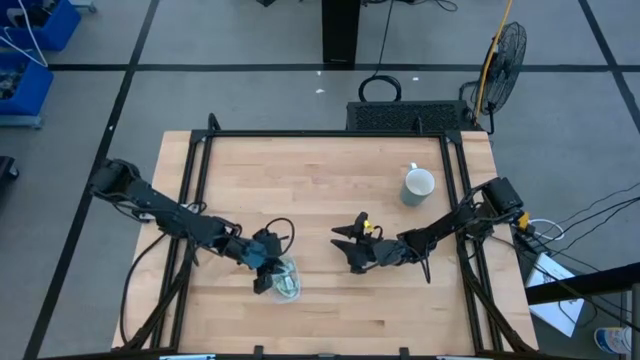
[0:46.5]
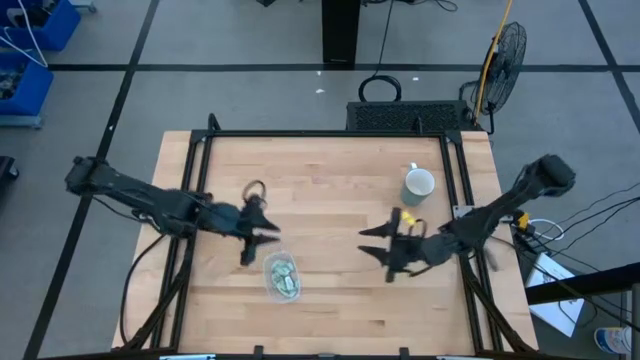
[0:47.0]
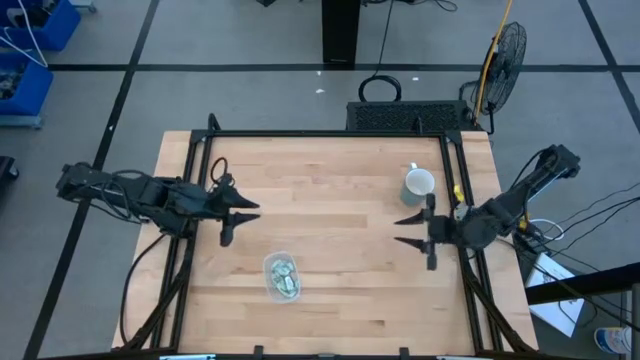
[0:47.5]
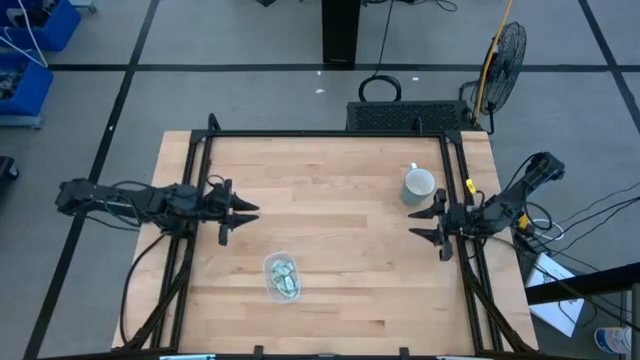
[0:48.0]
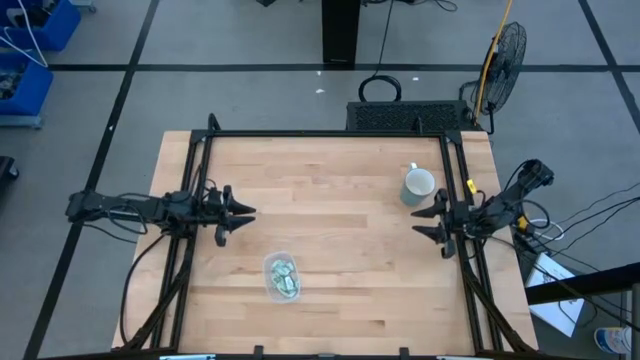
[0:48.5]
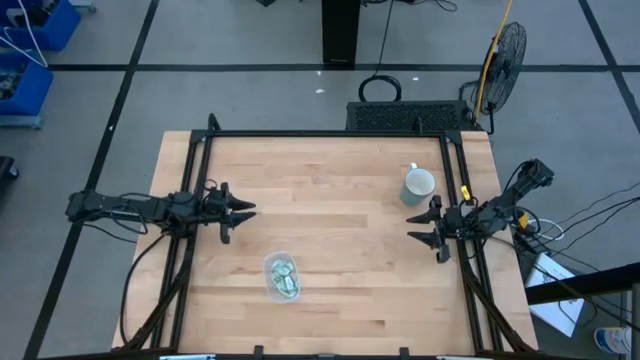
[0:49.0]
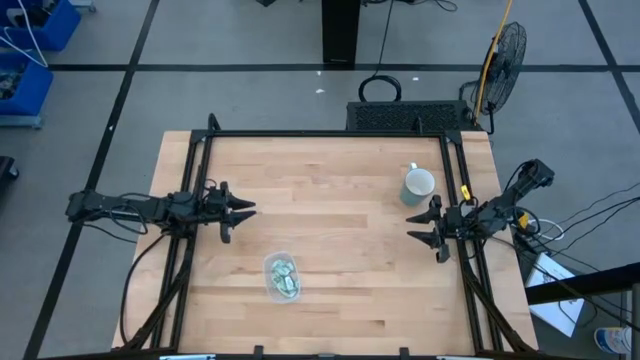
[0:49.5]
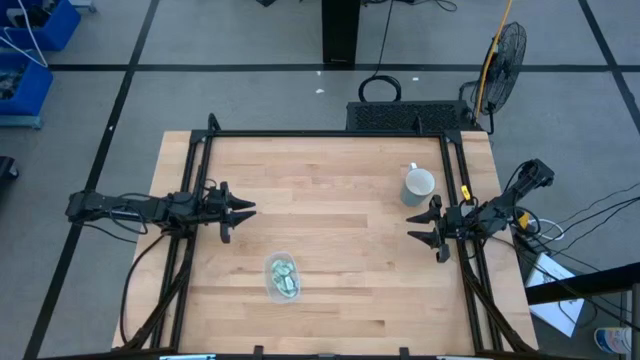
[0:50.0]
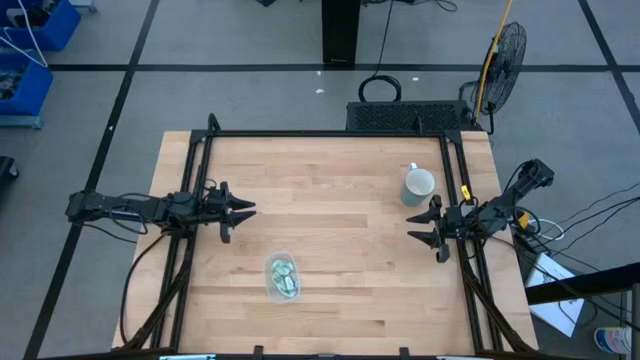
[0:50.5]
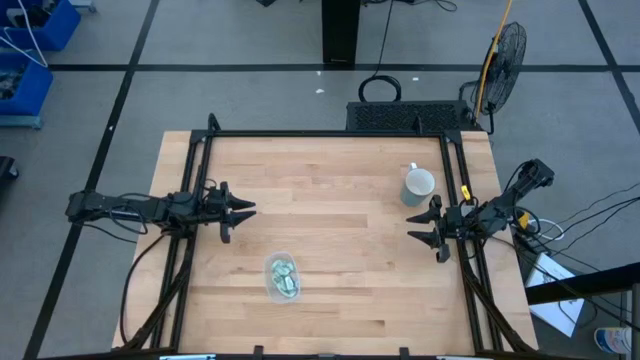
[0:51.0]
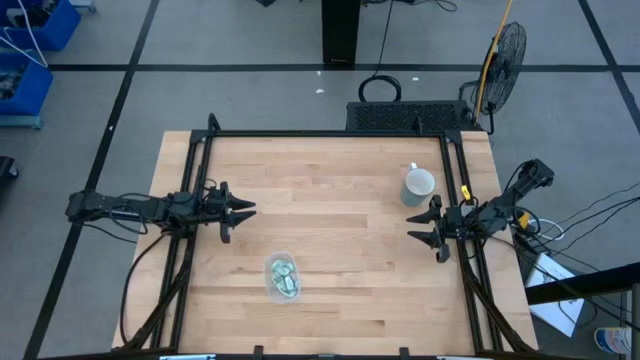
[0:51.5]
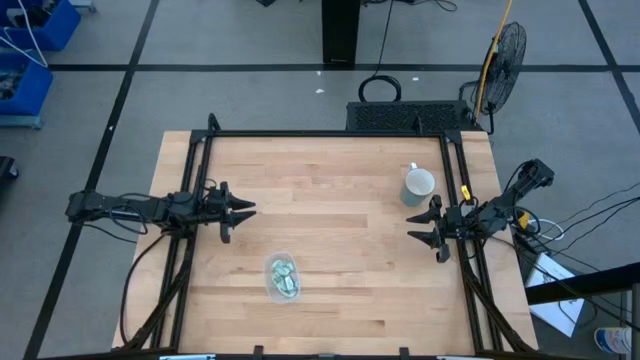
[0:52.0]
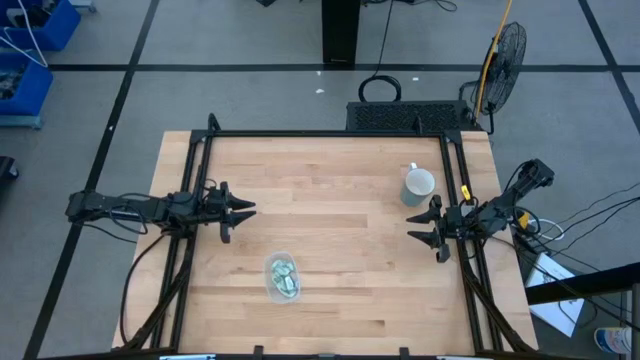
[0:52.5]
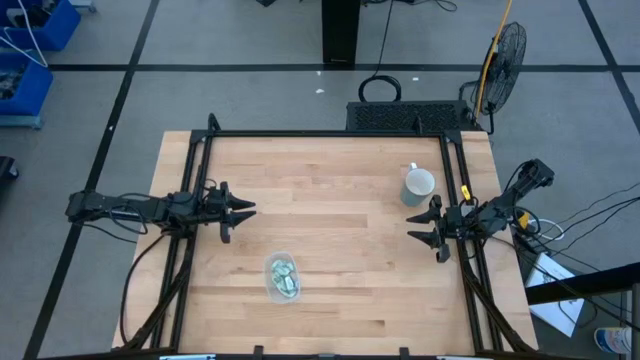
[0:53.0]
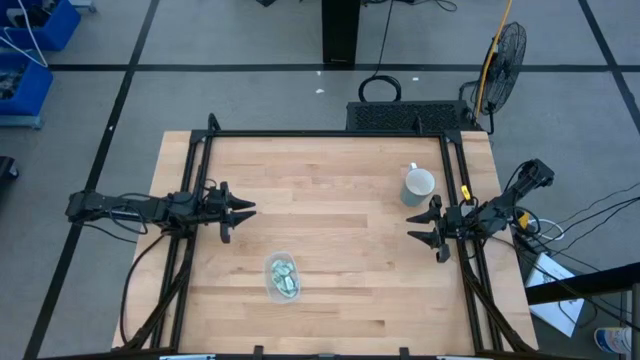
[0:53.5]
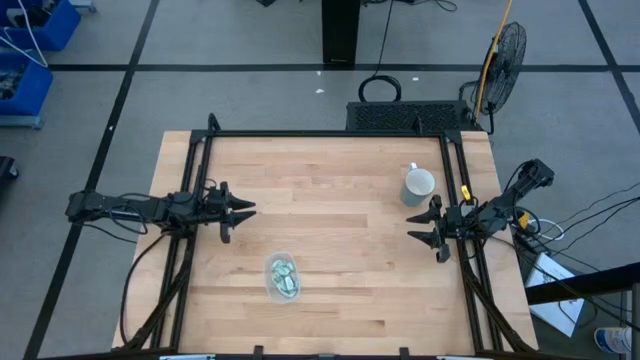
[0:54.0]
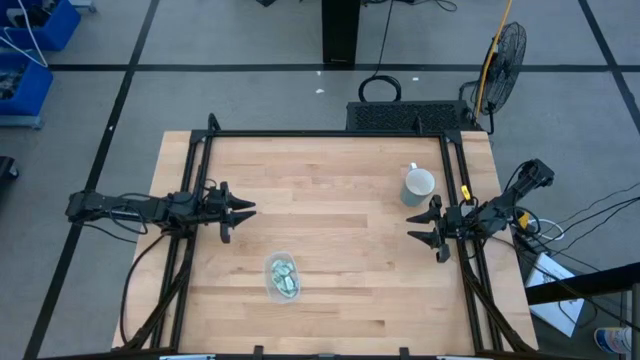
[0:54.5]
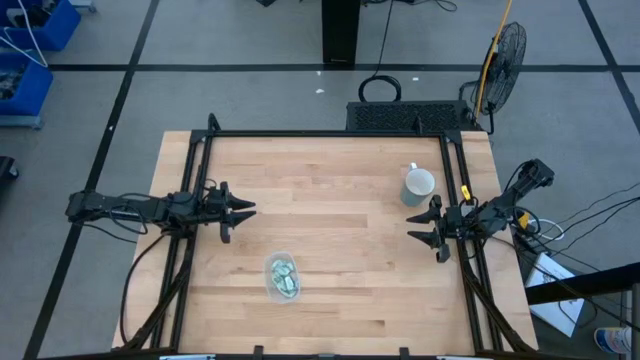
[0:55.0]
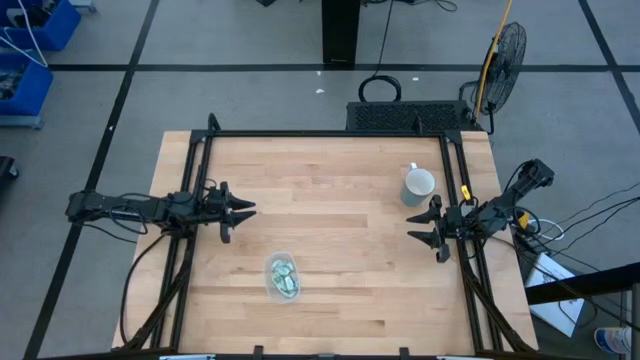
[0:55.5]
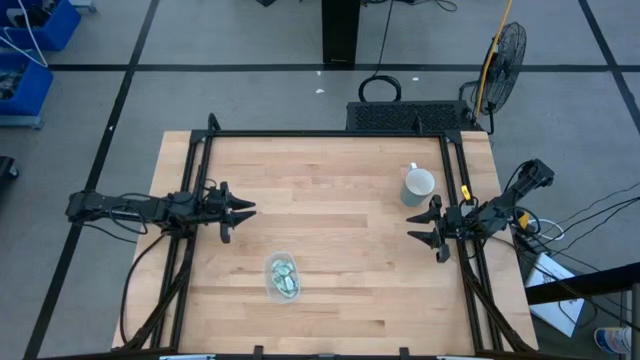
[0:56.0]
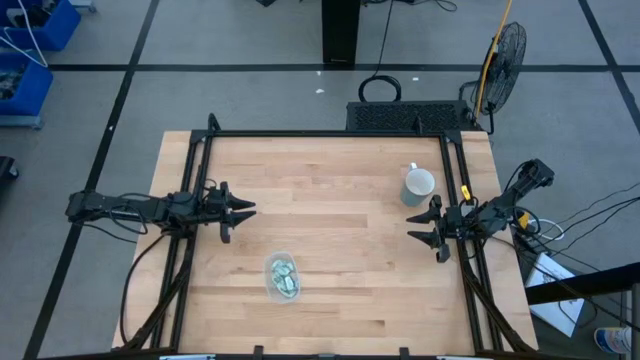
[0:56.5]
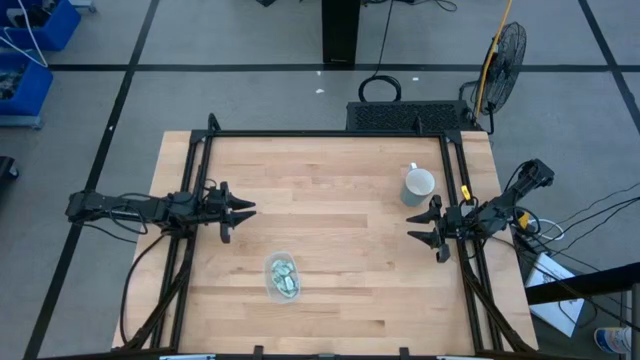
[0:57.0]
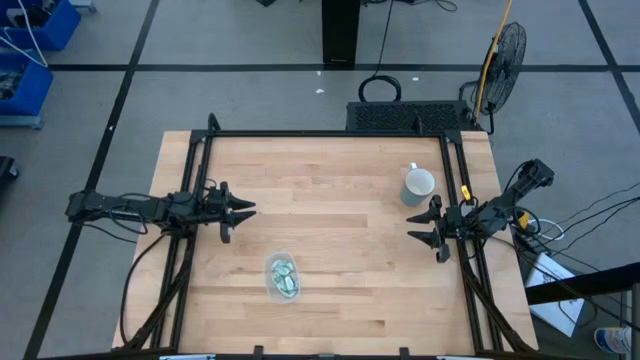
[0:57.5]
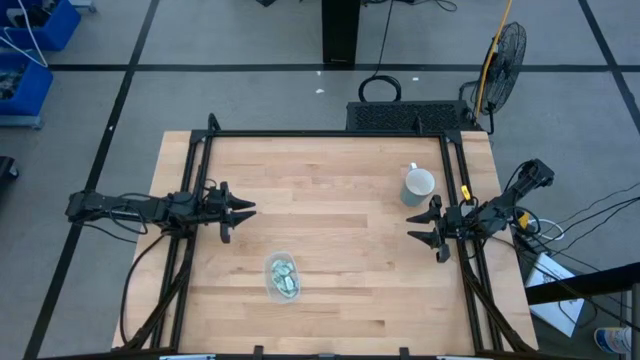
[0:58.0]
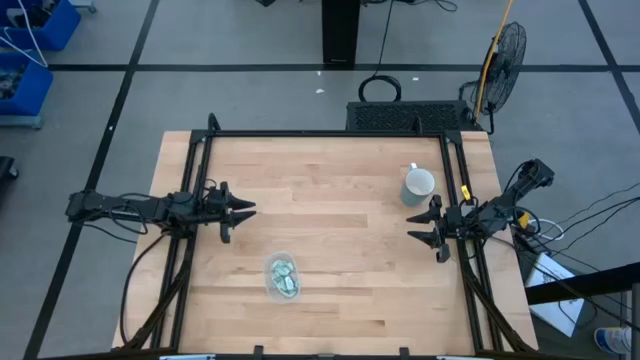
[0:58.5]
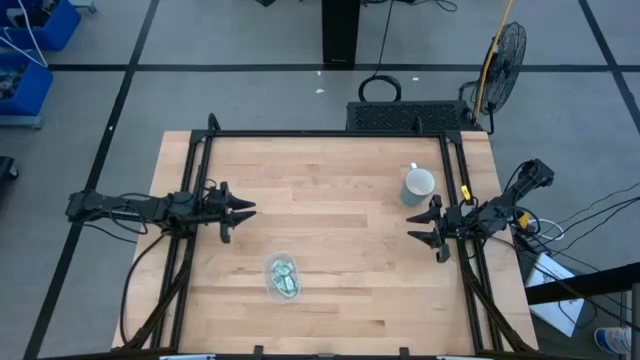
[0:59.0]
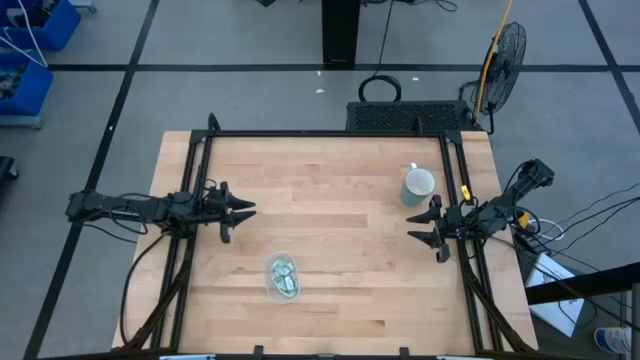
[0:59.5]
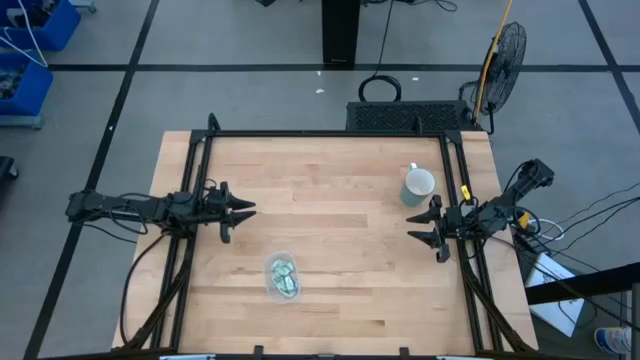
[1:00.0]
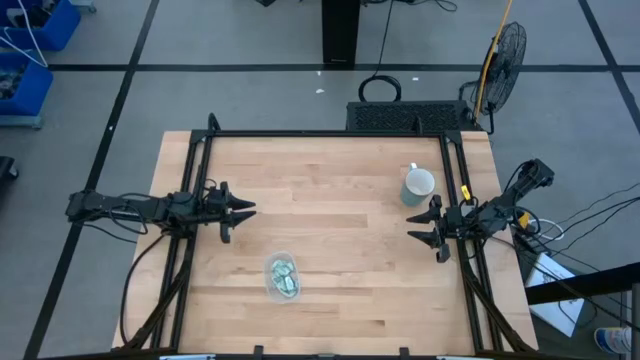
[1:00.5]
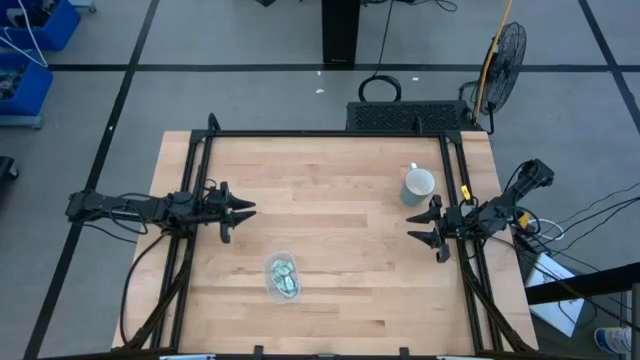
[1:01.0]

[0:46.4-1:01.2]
Task: Pick and place Stevia / Truvia into bins
Return to Home Position

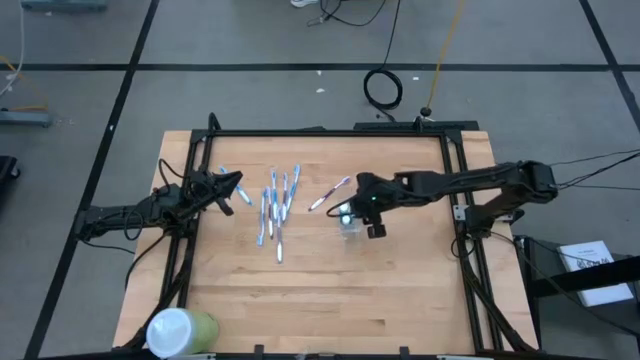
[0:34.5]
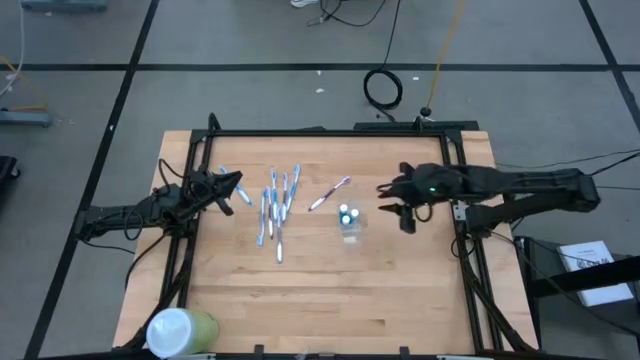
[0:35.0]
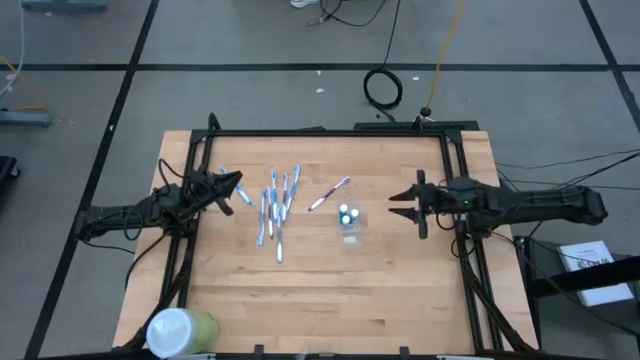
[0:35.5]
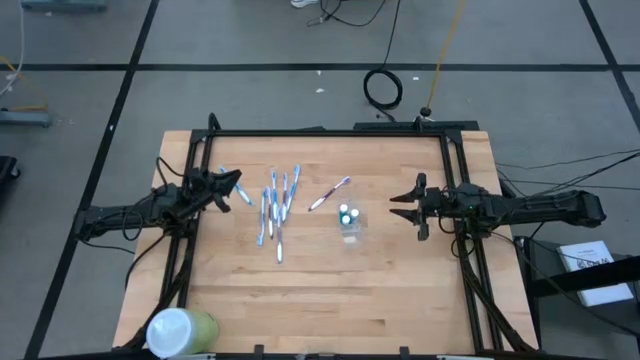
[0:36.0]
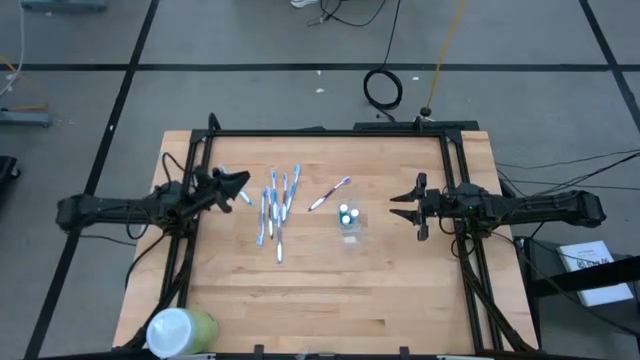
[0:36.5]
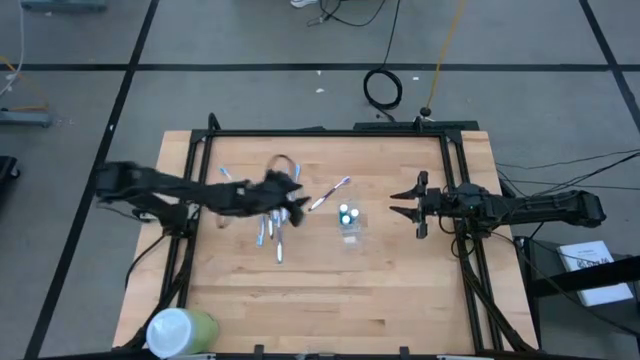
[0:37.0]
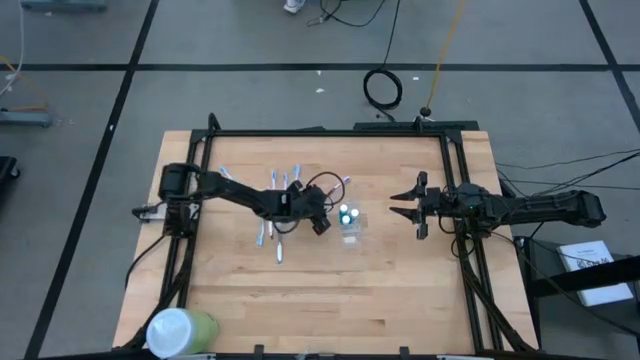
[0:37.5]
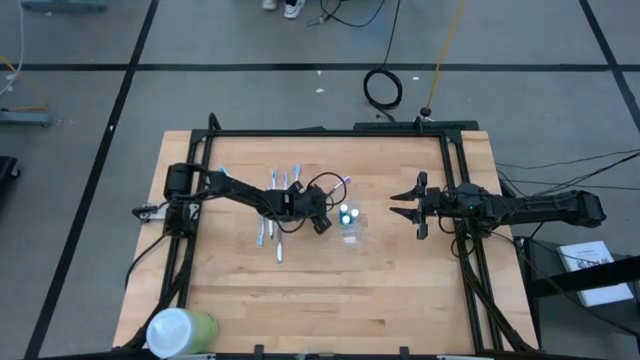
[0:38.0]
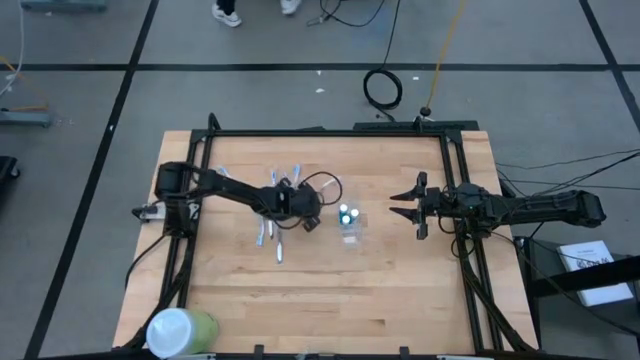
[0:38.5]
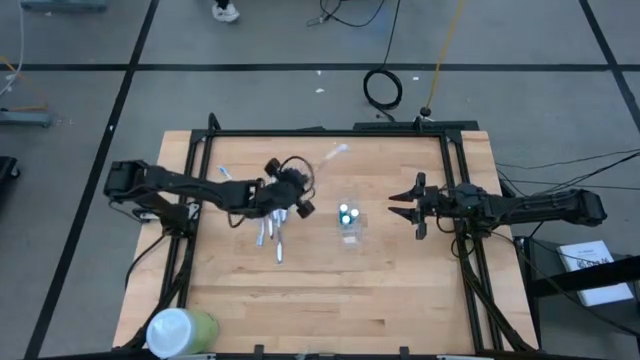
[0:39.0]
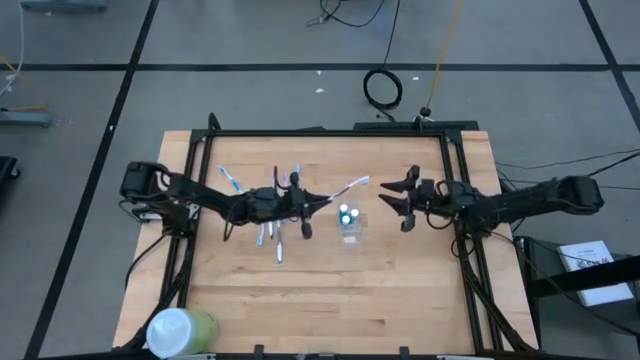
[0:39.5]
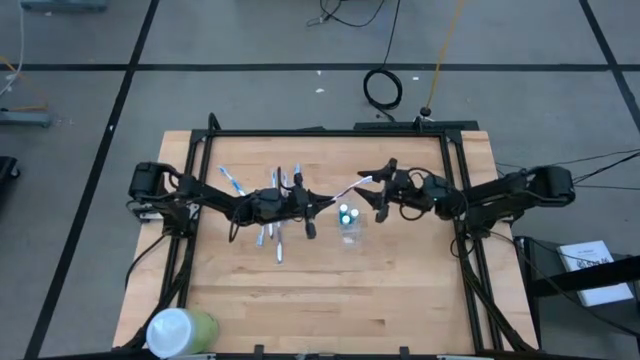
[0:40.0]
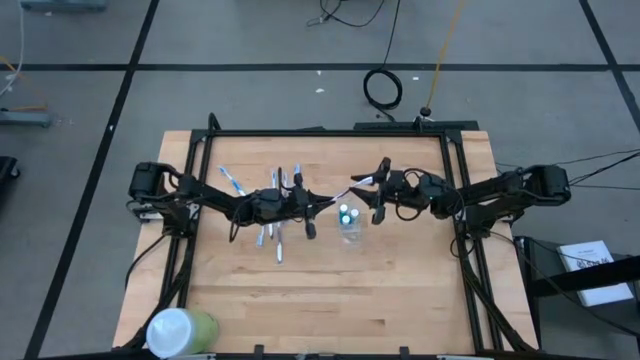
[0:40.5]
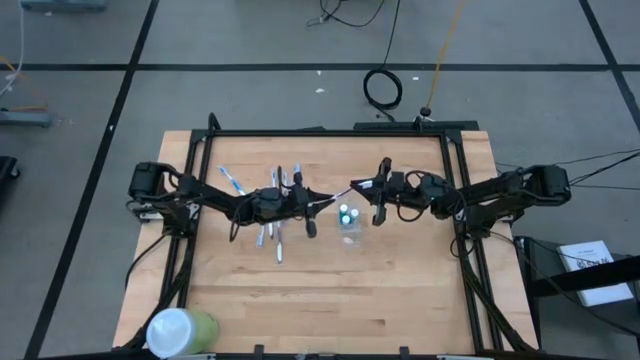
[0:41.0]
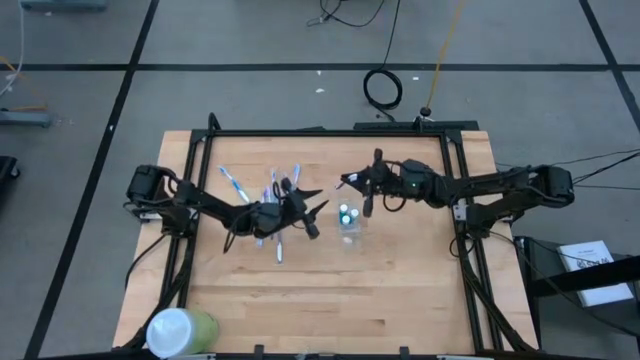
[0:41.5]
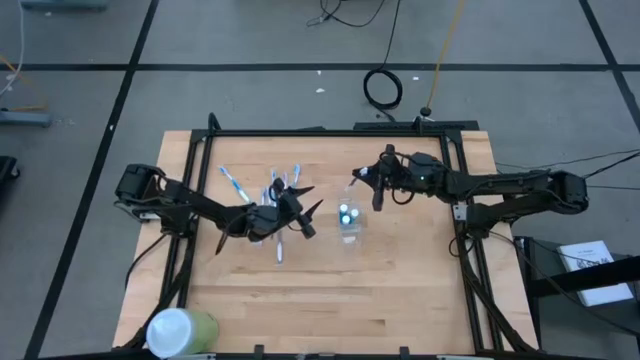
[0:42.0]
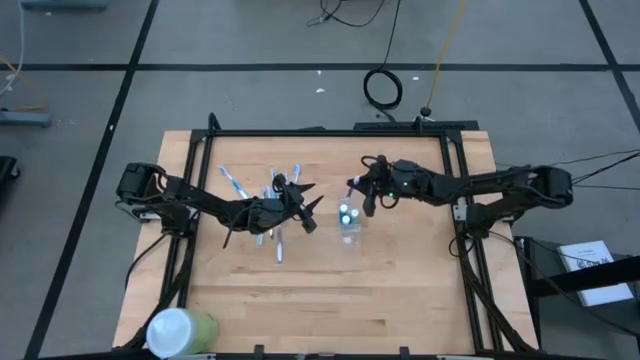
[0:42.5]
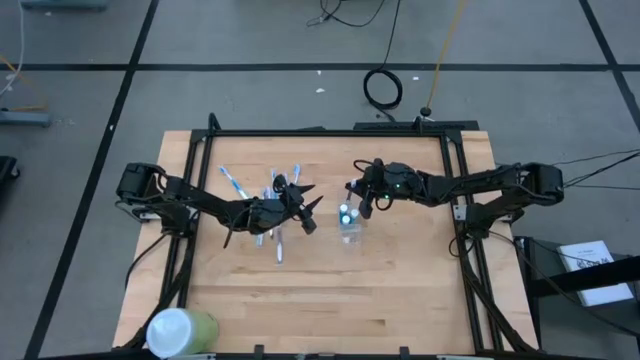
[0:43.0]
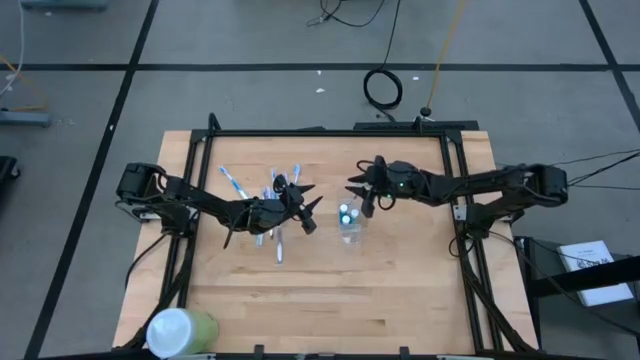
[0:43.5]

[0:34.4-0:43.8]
Task: Pick & Place toothbrushing station
Put the violet toothbrush into the transparent organizer
